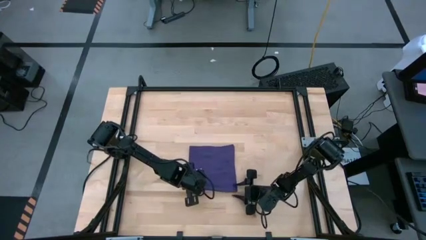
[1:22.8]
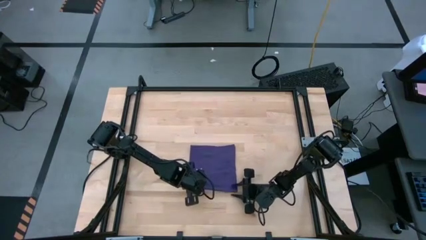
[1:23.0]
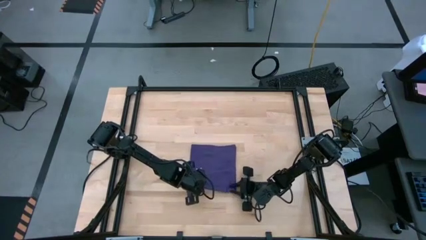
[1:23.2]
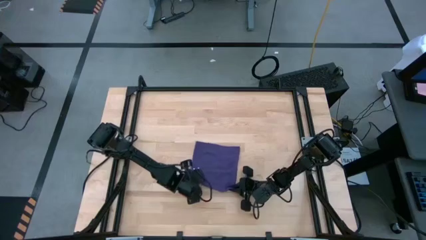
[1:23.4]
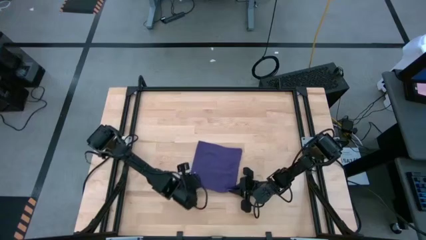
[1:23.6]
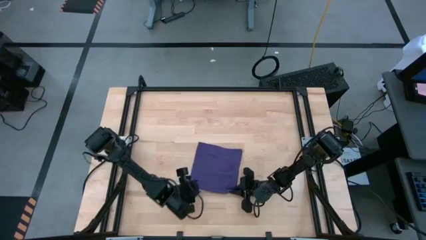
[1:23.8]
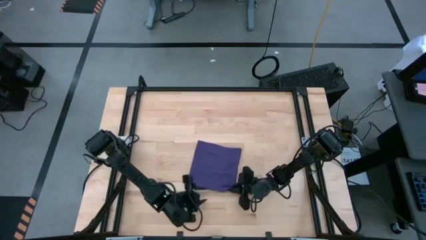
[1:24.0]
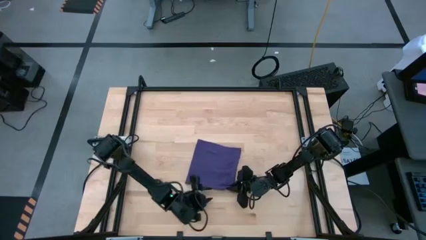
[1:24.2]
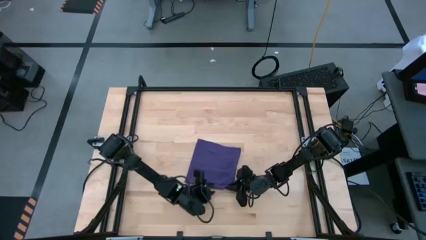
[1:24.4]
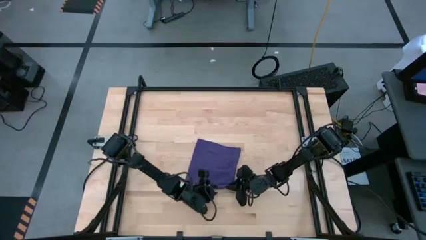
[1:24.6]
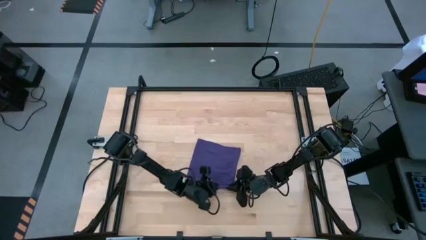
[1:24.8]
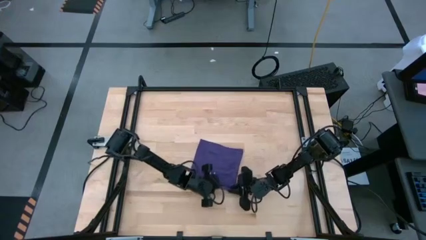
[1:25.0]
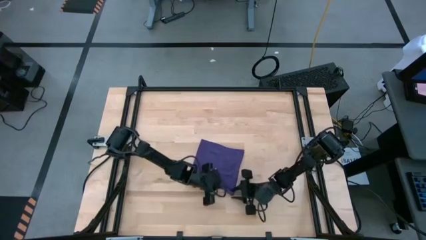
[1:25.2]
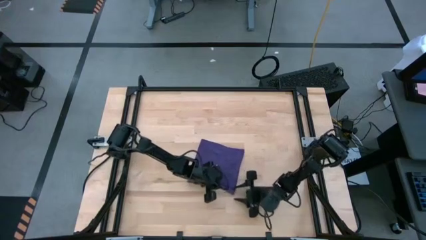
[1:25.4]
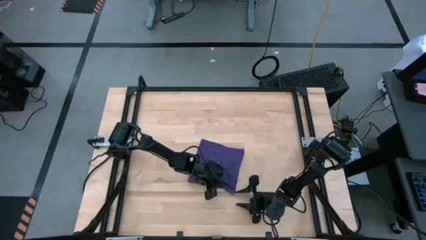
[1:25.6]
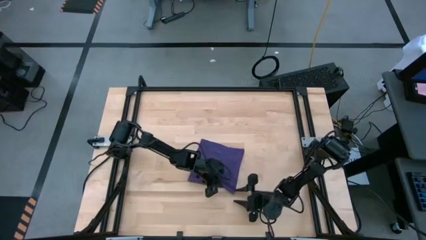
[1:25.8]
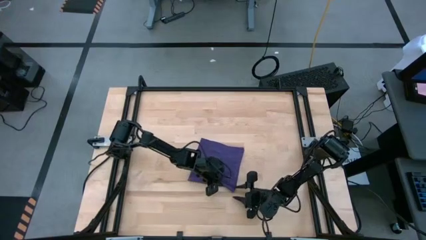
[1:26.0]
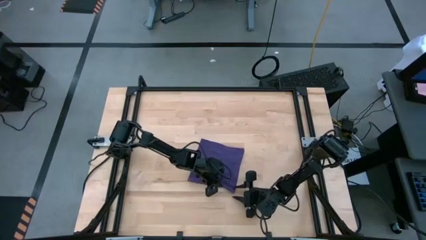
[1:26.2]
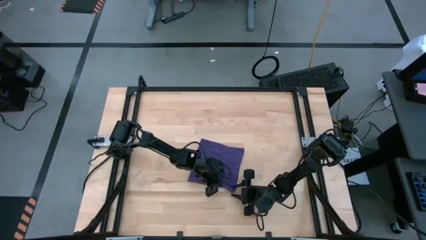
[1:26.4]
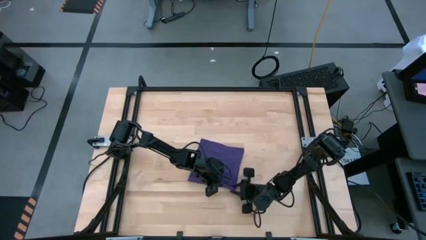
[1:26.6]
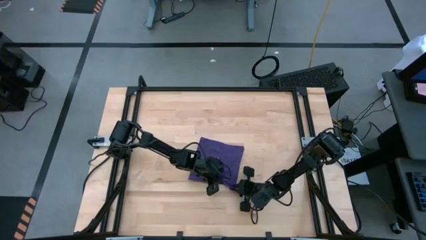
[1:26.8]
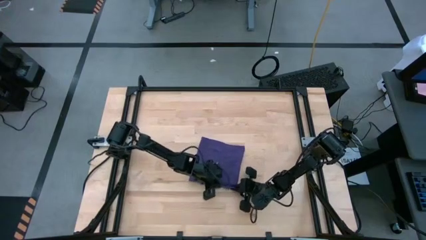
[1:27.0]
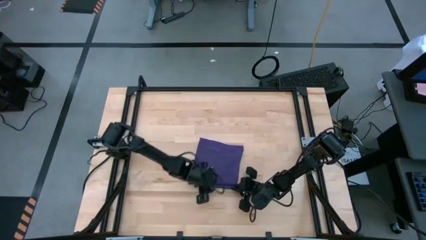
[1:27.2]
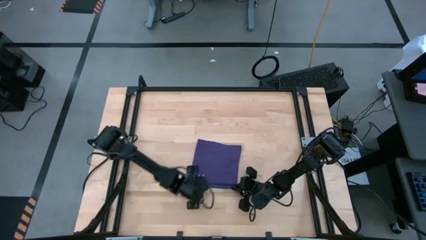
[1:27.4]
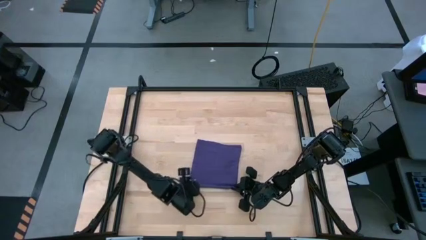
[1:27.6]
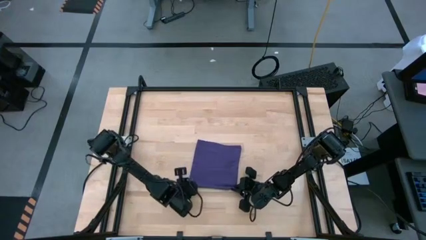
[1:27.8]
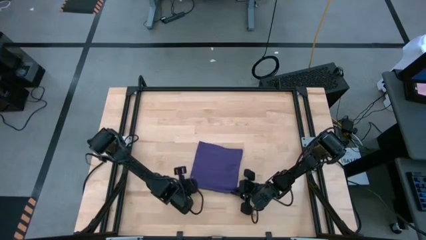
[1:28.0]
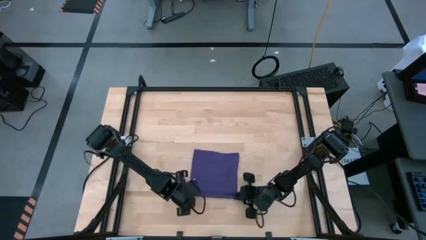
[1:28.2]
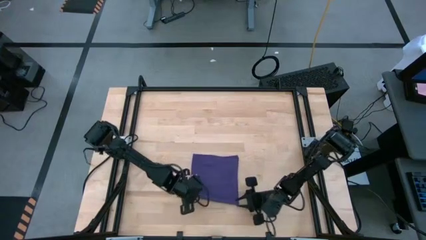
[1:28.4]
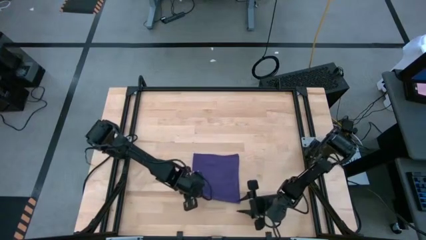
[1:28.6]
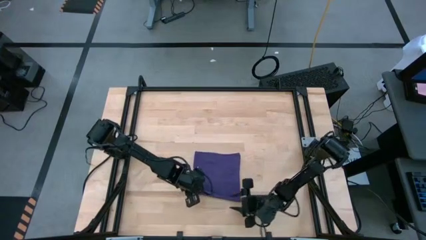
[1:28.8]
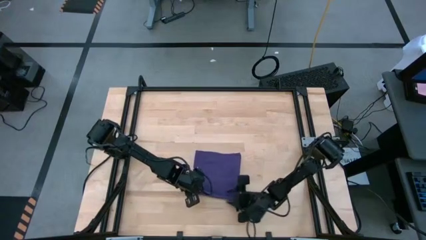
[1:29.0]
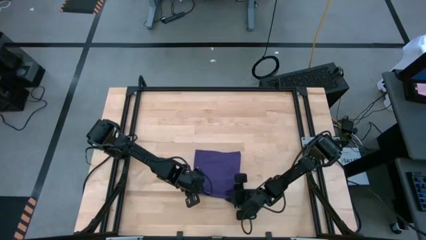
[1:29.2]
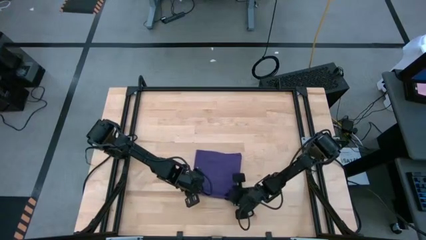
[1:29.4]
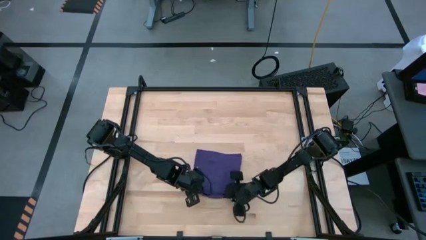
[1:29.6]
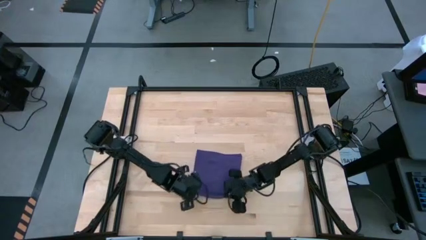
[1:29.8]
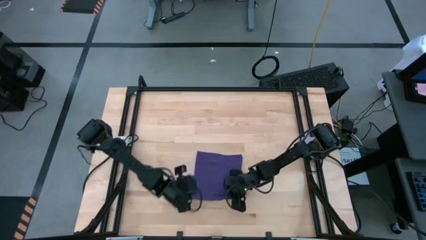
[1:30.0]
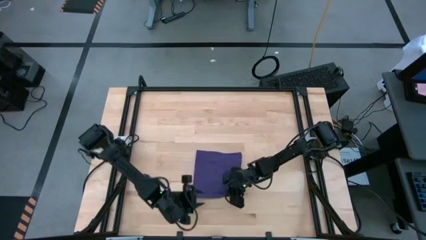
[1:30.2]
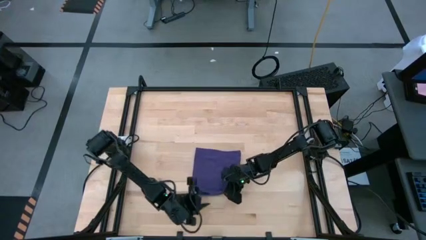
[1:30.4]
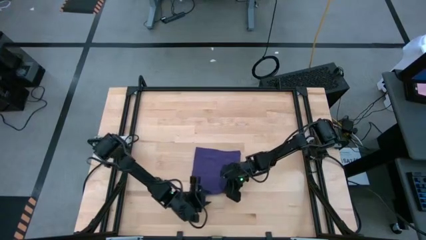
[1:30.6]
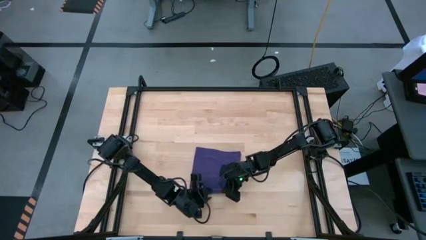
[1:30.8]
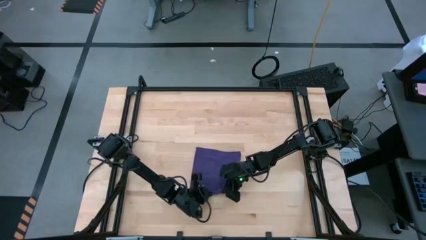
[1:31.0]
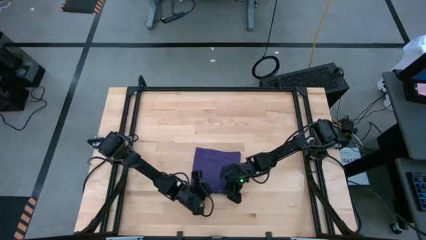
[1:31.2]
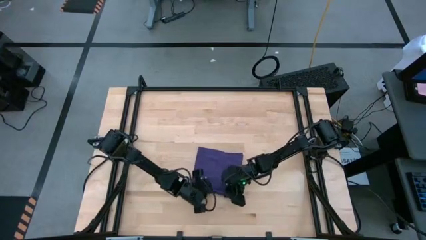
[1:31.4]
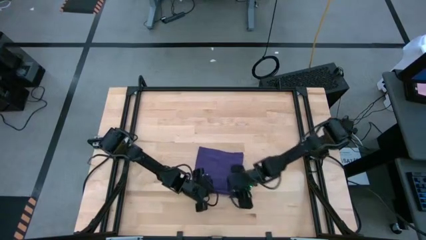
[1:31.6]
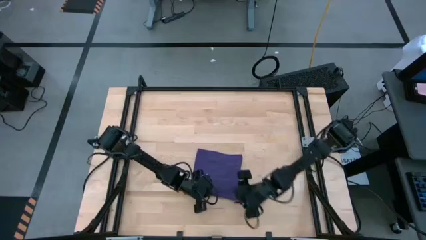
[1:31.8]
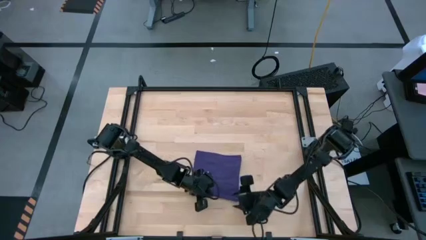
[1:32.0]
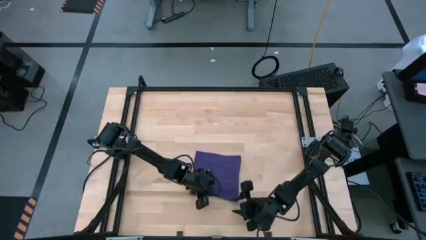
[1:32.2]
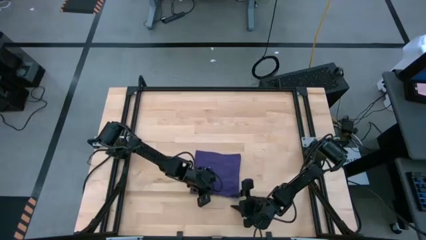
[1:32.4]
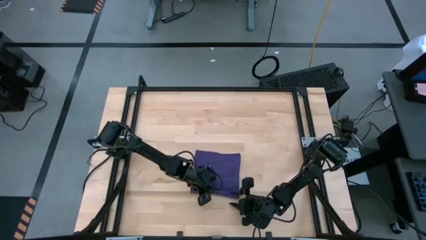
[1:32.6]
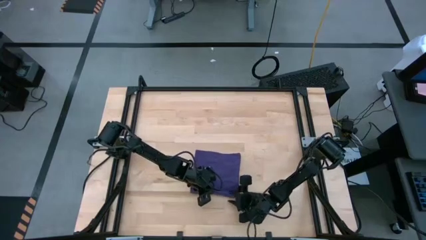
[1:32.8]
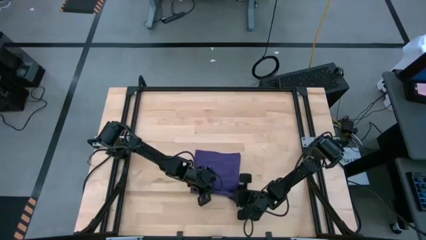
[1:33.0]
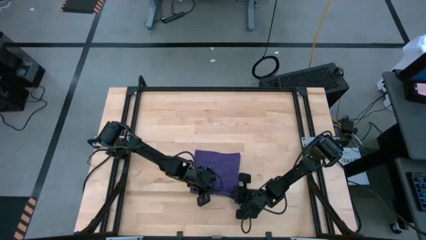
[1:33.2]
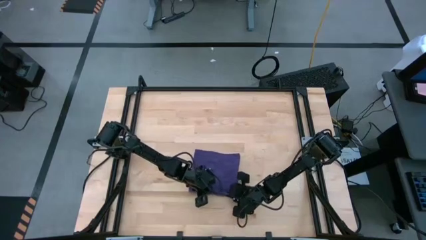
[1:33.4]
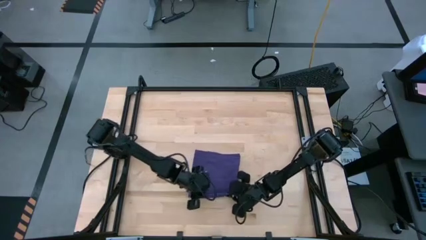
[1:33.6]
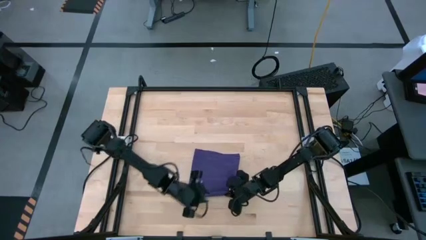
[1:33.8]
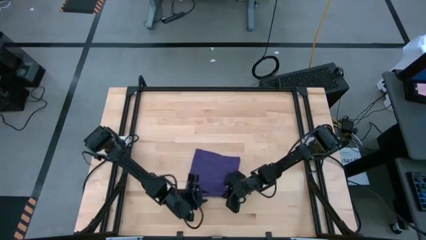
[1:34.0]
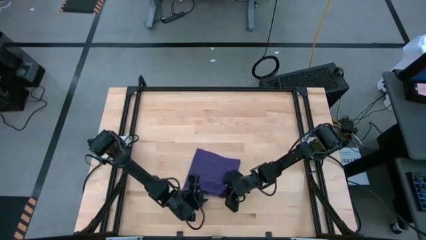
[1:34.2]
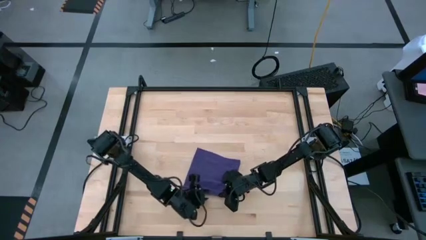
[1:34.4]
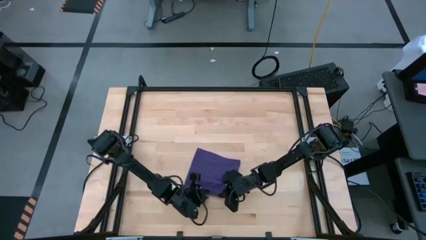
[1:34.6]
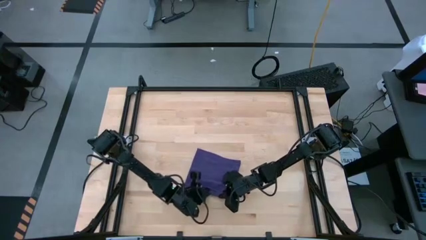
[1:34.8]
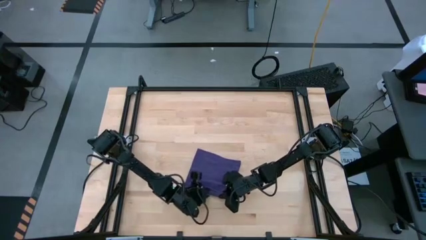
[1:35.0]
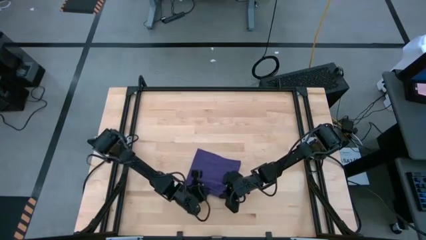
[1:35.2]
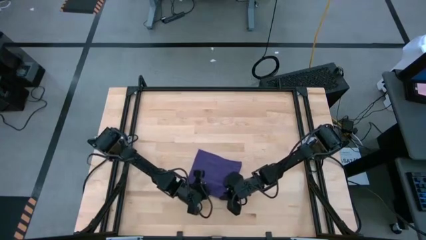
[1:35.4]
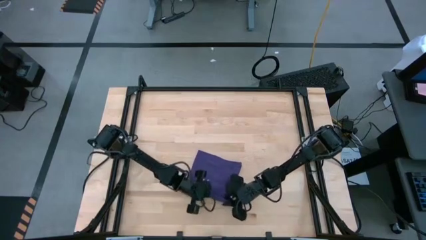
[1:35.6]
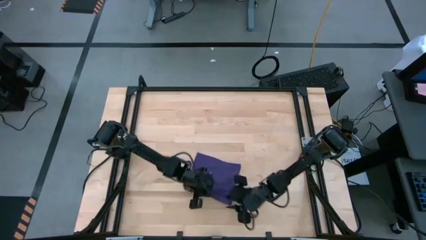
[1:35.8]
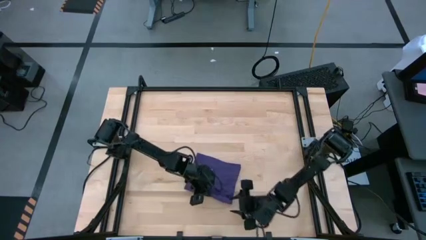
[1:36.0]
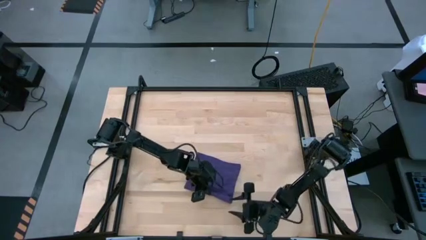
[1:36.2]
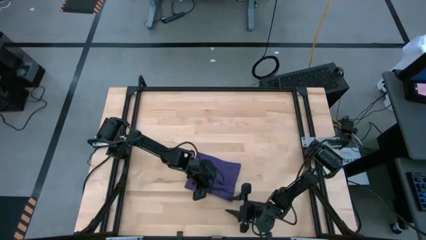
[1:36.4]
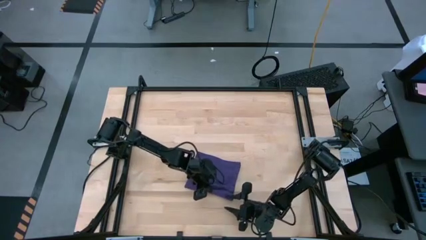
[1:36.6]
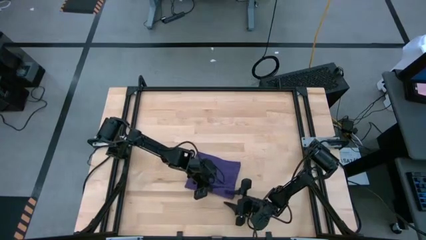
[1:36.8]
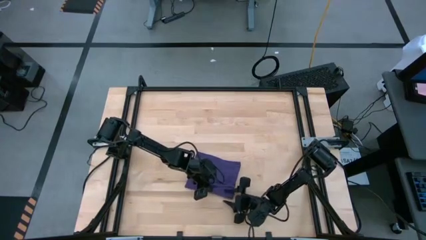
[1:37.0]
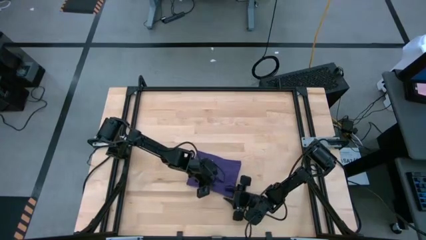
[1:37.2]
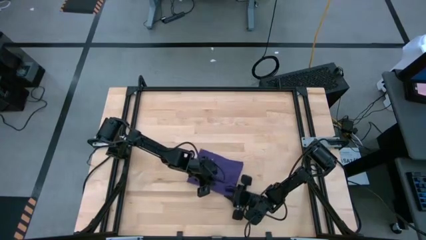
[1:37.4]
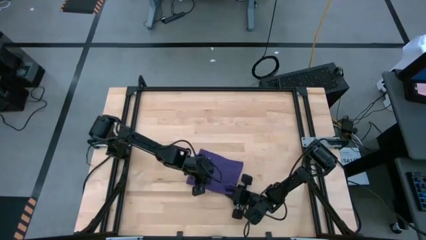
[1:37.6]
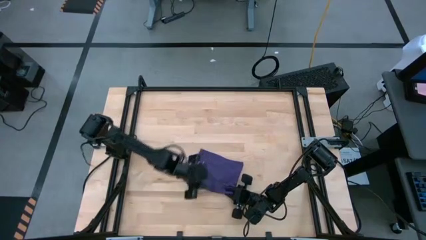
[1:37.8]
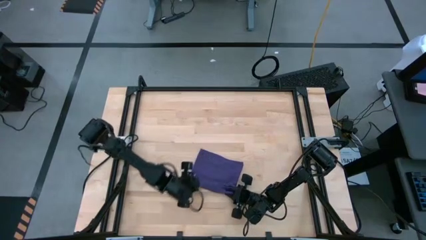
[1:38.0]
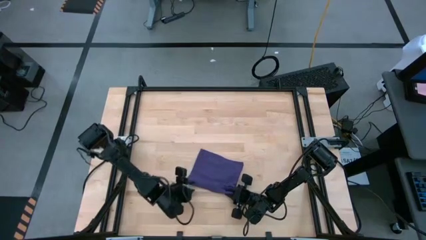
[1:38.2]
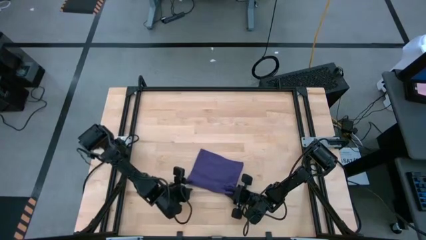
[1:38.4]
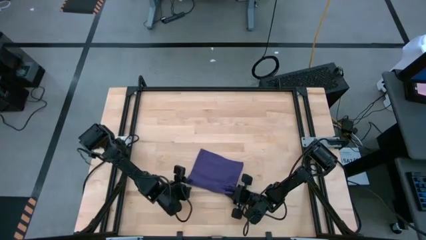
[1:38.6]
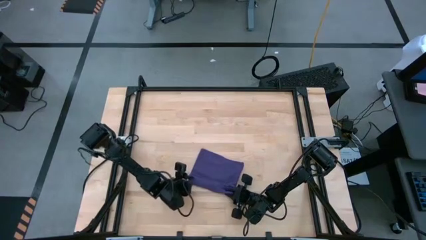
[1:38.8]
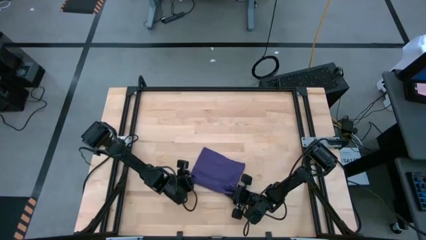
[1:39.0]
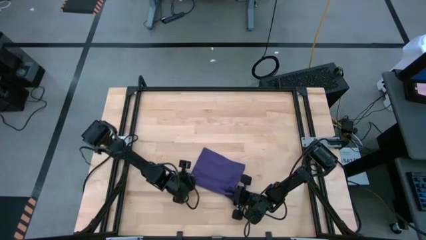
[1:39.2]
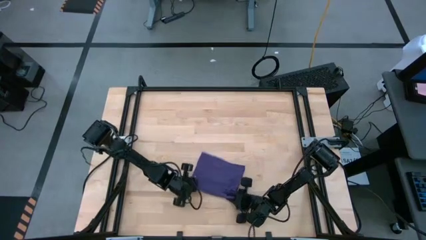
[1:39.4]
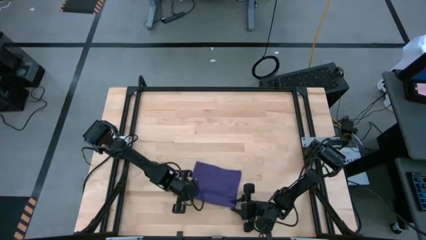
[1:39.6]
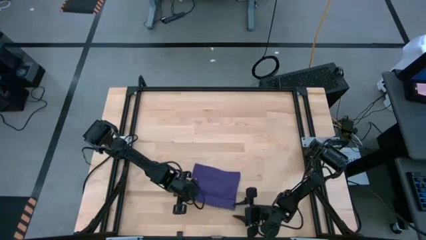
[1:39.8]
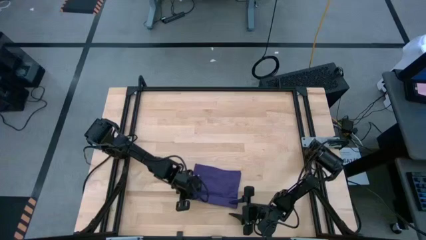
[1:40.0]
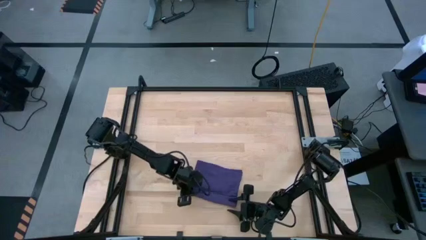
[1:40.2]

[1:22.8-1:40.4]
Task: Roll towel
Roll the purple towel
